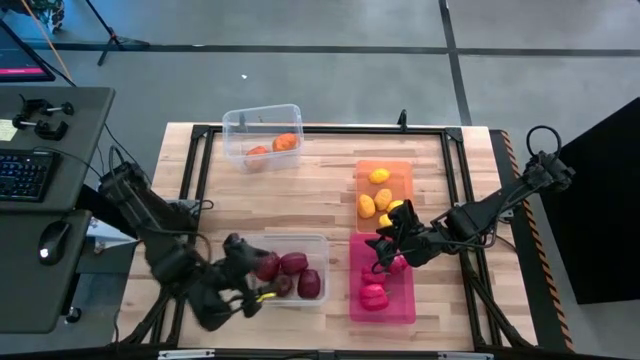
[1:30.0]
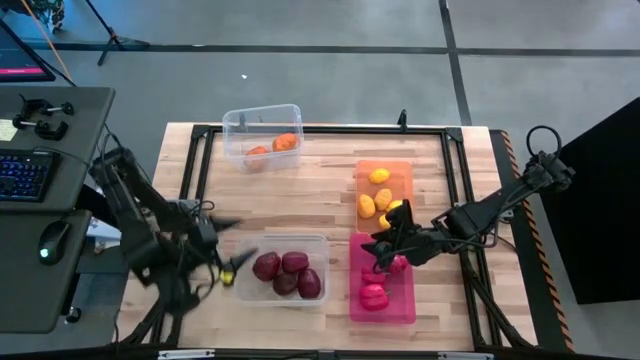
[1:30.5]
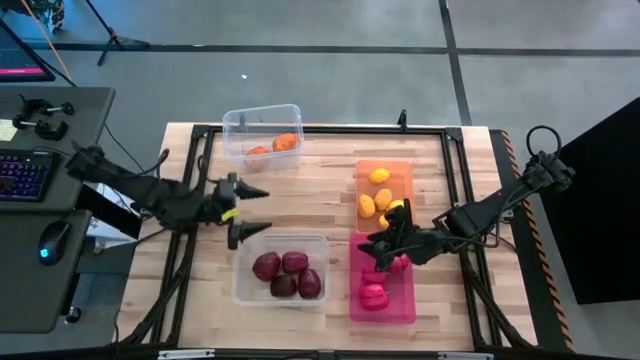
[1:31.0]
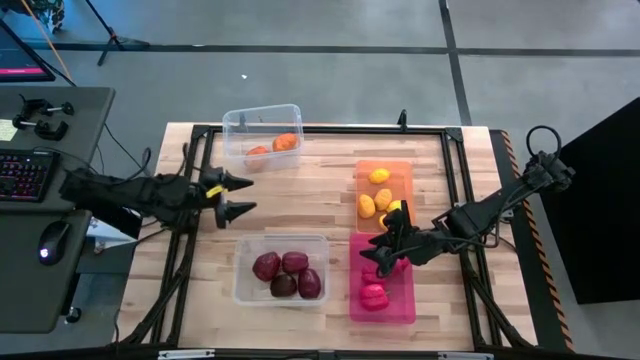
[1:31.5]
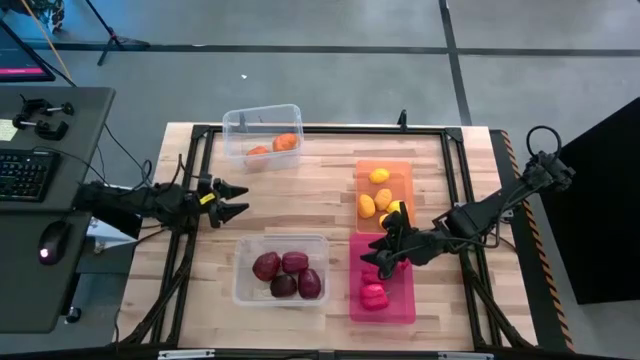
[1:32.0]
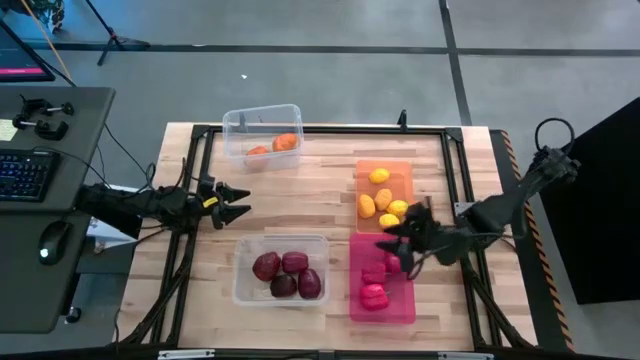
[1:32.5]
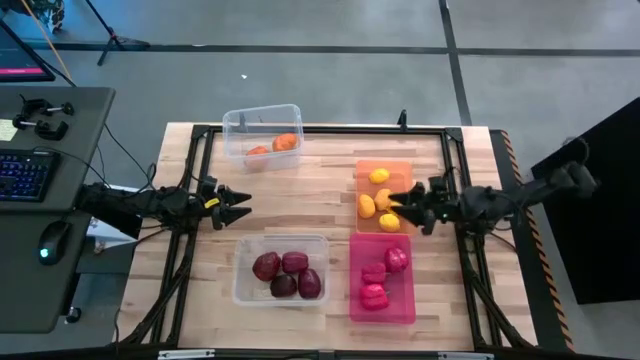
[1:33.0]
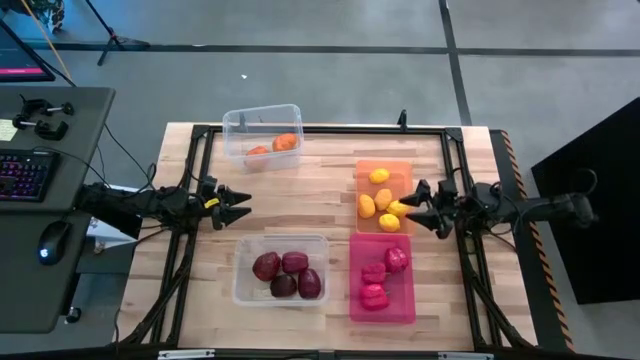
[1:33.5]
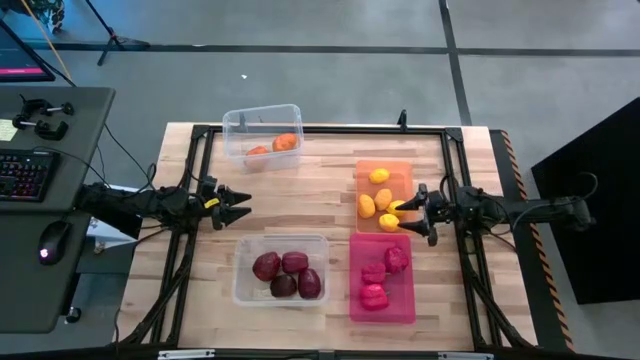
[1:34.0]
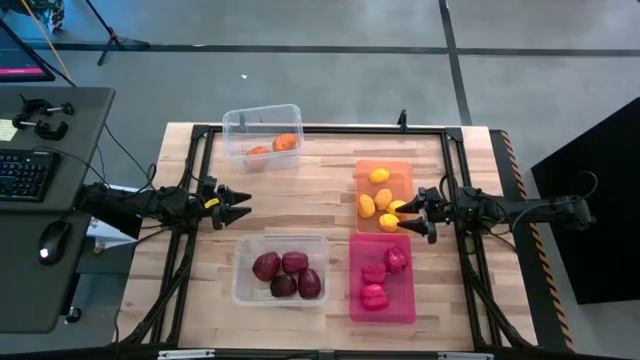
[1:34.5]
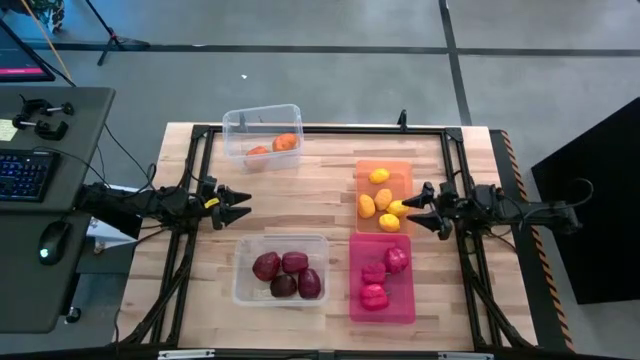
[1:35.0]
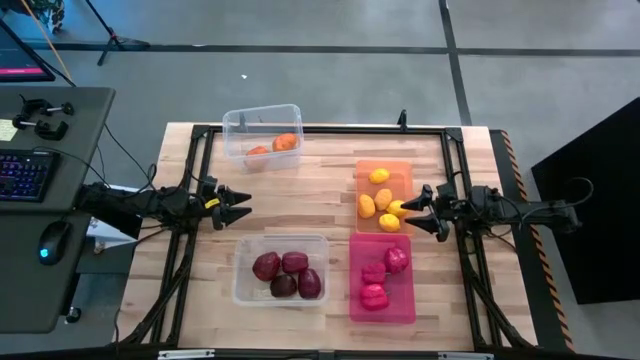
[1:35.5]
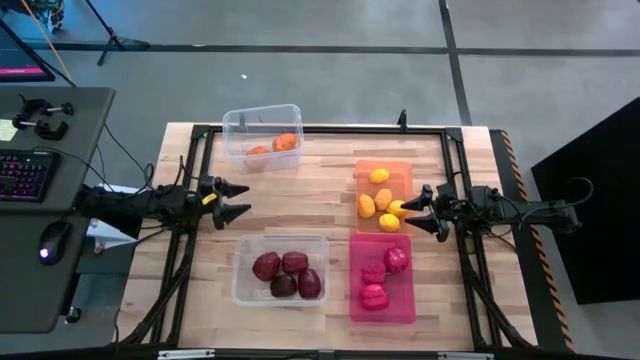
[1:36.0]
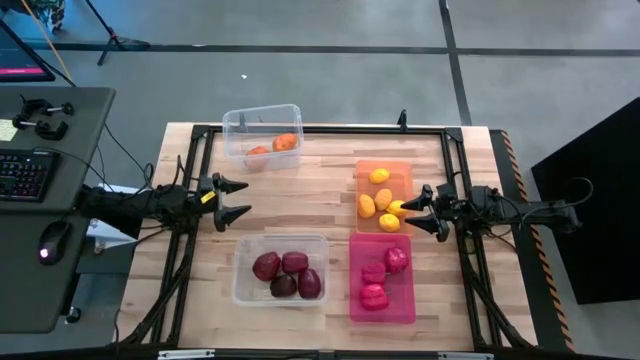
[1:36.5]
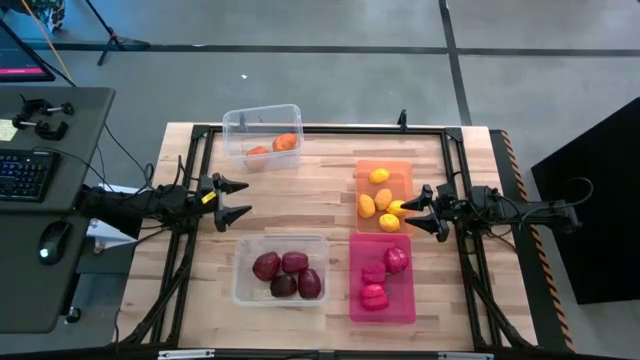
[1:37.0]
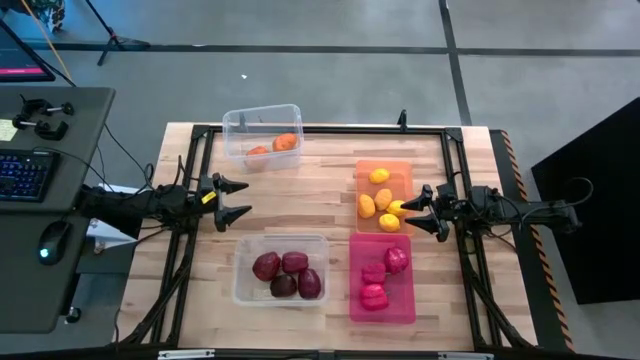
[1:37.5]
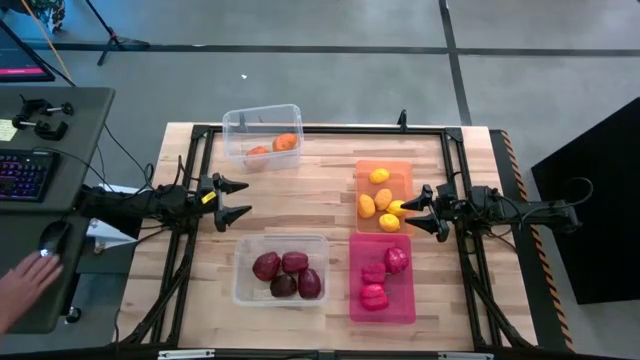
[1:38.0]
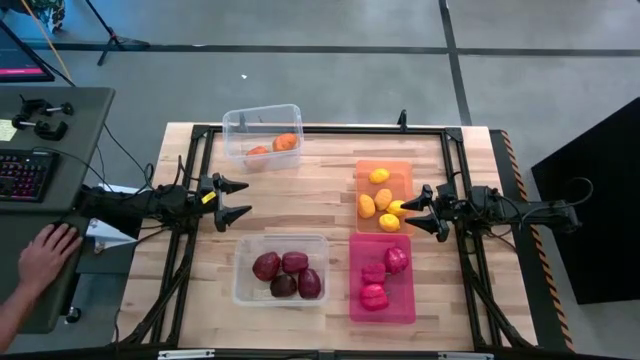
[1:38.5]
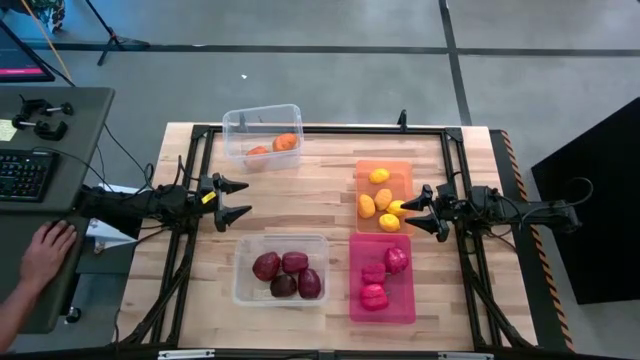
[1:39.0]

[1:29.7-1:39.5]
Task: Sort produce into baskets
Return to Home Position

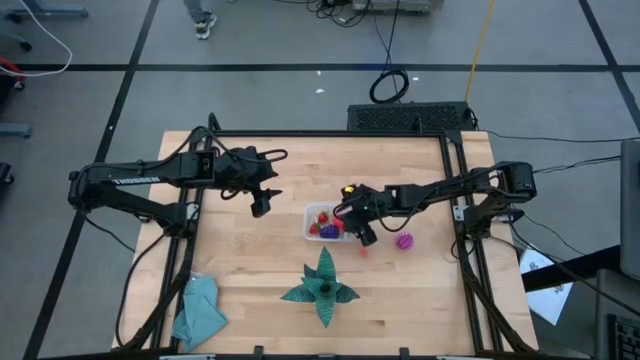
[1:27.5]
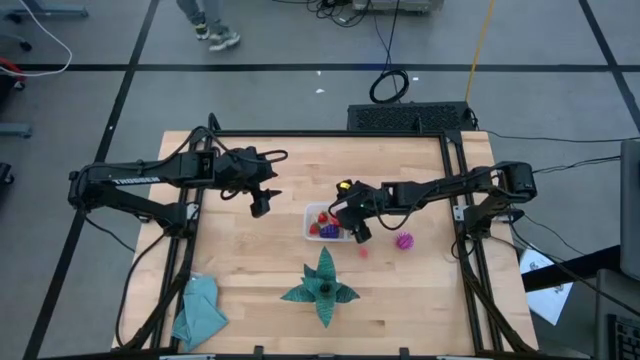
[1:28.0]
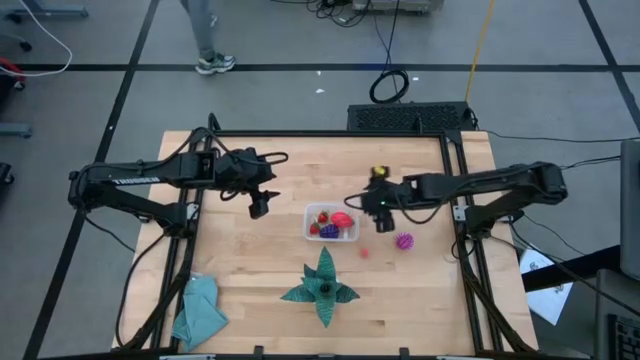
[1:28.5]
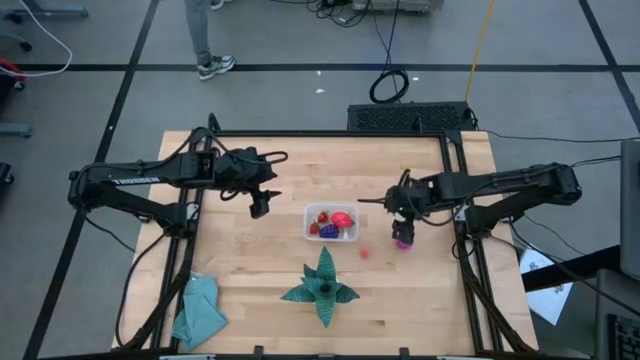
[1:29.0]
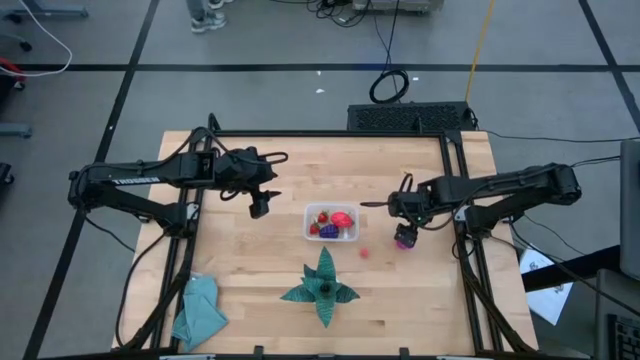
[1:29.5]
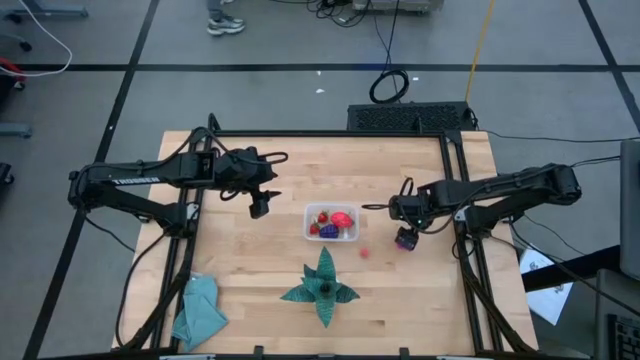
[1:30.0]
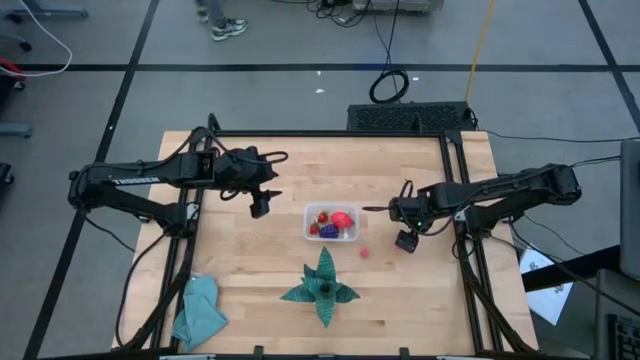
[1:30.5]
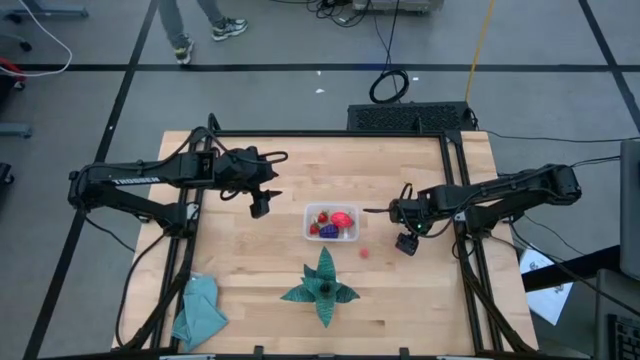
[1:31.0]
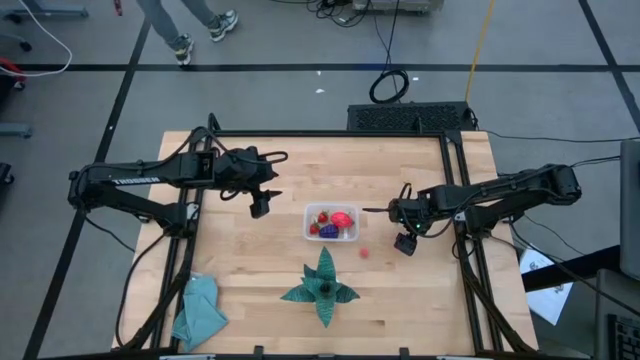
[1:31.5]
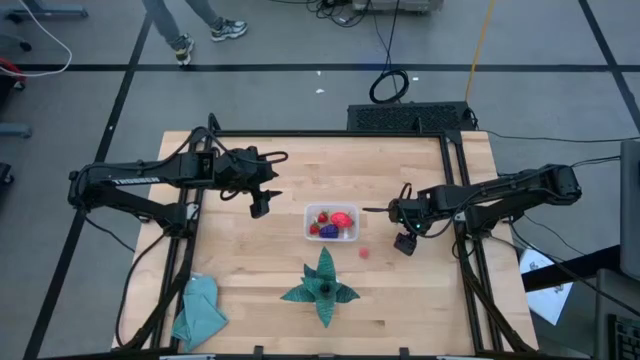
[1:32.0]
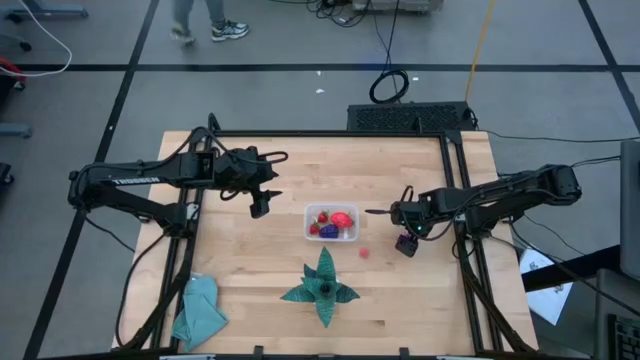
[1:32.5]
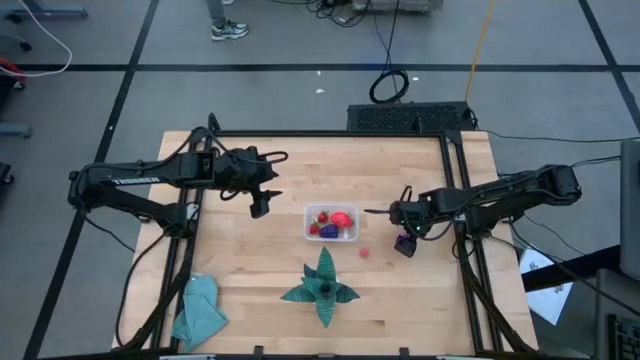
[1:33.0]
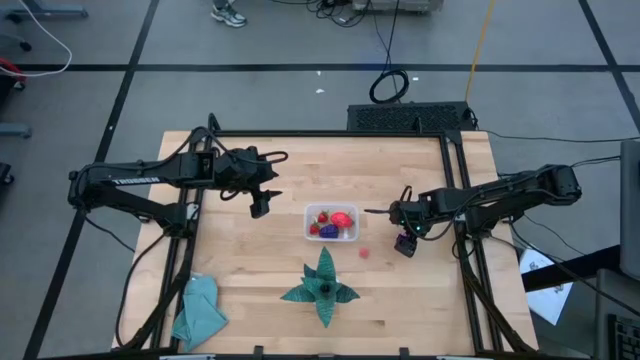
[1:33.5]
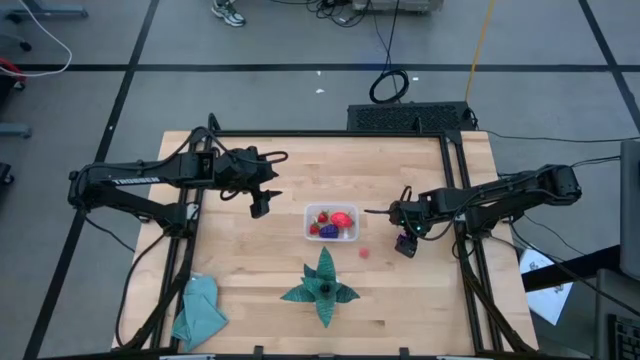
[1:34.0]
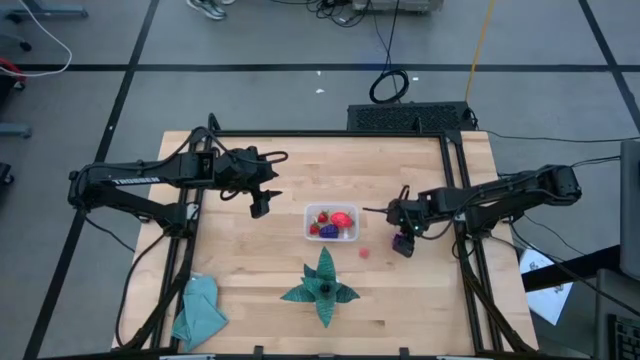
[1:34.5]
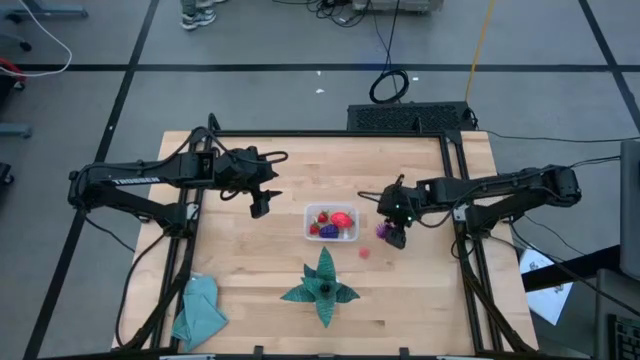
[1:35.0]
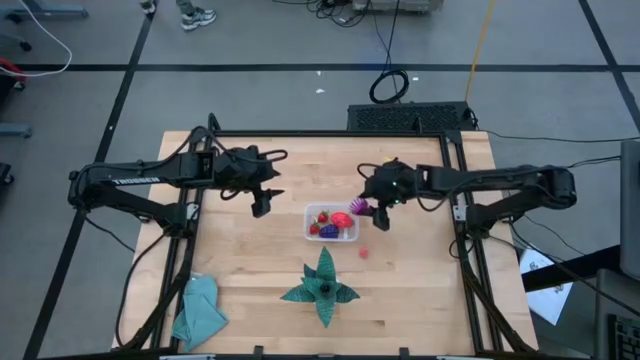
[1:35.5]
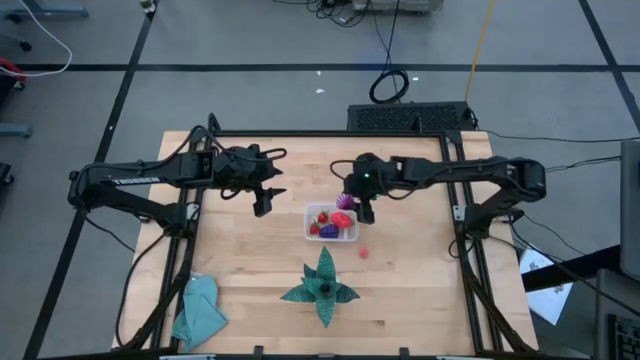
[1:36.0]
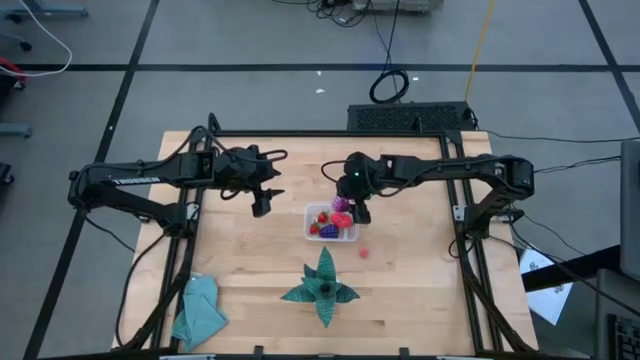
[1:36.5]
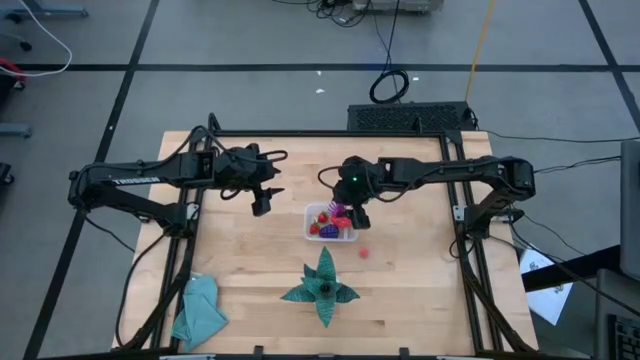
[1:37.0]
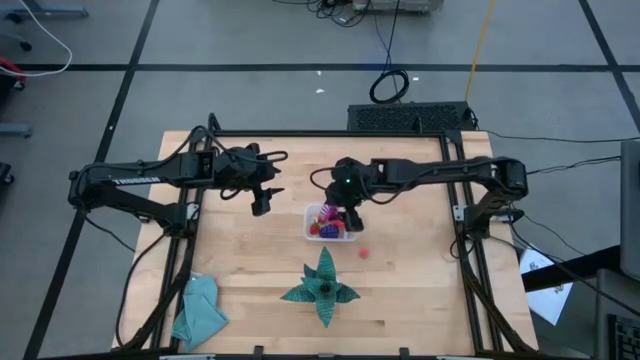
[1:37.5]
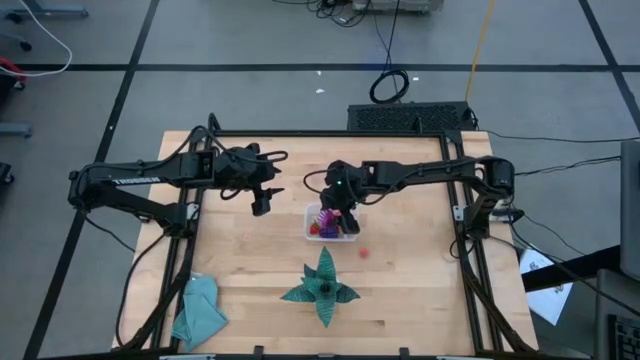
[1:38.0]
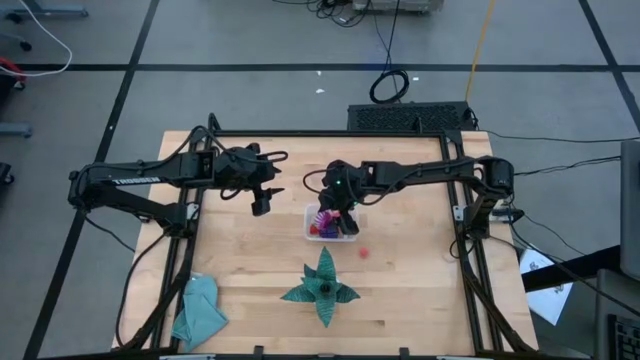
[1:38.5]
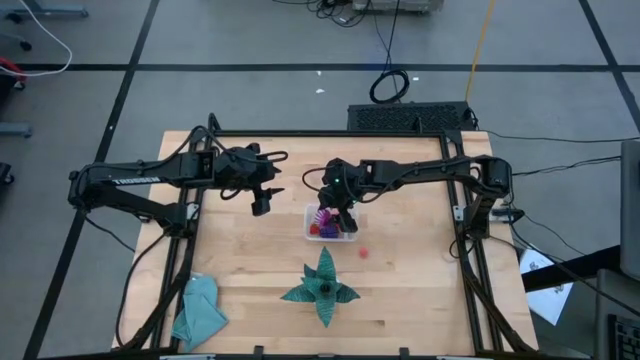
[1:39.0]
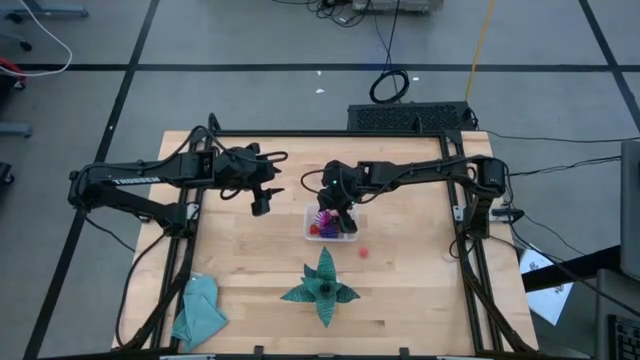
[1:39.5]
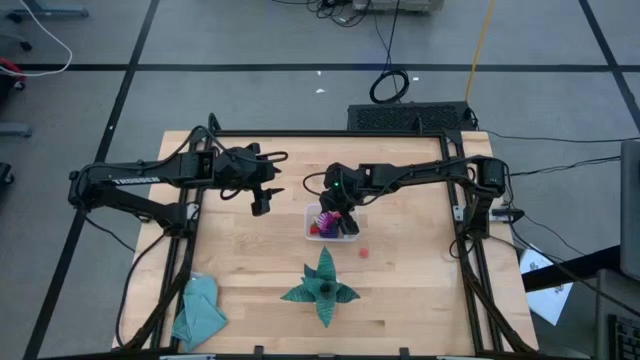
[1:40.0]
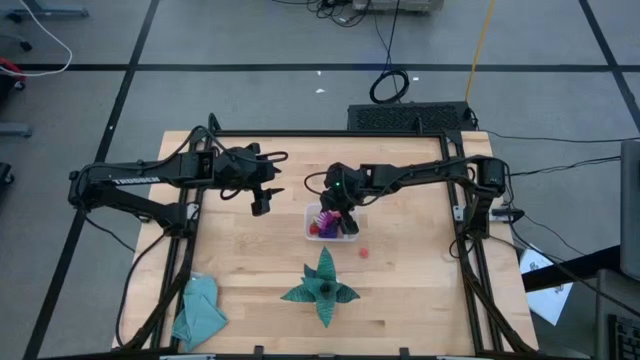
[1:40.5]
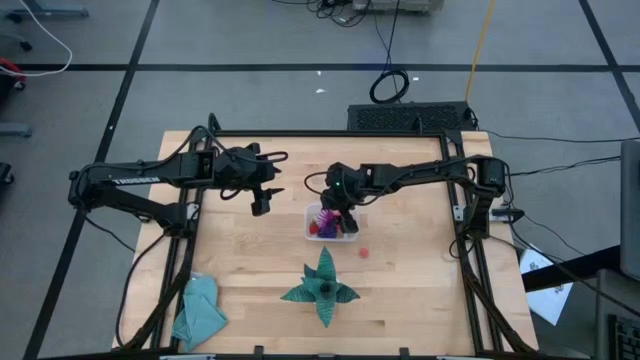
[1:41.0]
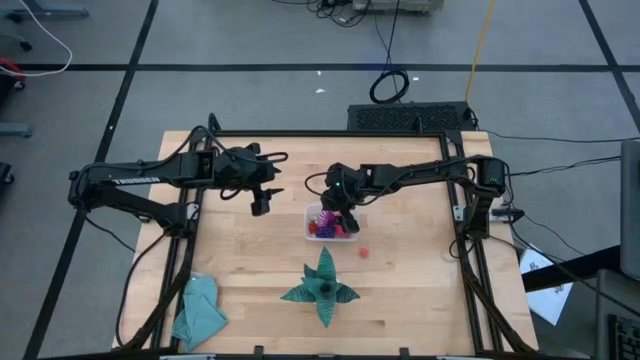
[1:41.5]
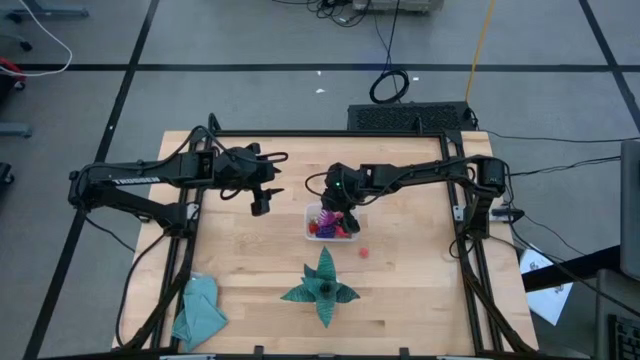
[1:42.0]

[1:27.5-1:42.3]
Task: Pick and placing Produce into tupperware
Put the purple onion into the transparent bin
